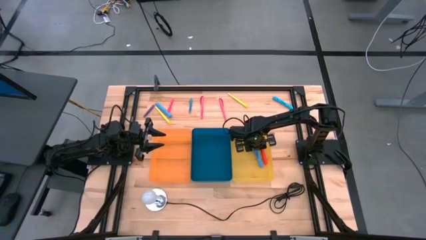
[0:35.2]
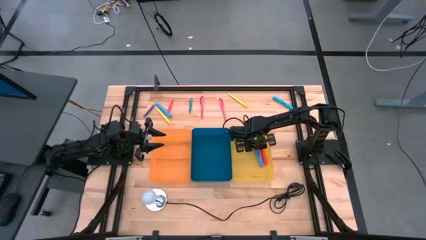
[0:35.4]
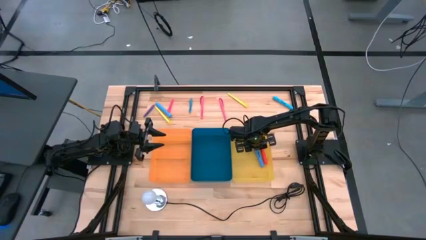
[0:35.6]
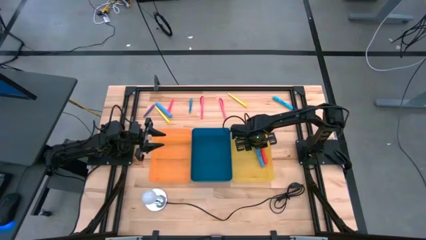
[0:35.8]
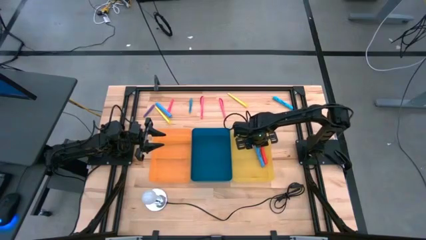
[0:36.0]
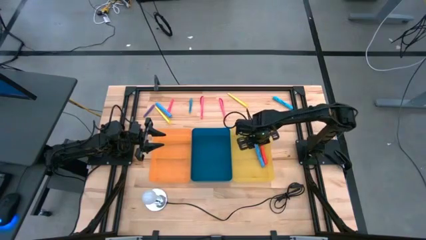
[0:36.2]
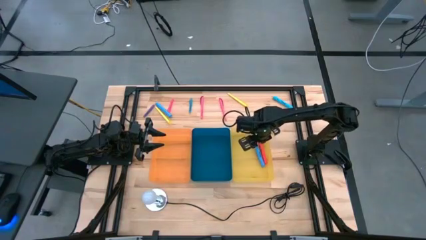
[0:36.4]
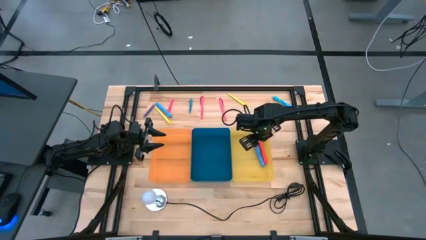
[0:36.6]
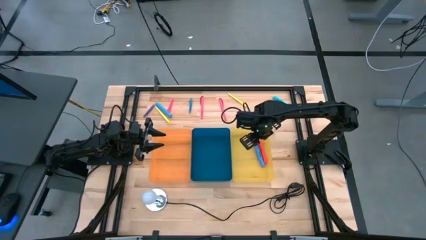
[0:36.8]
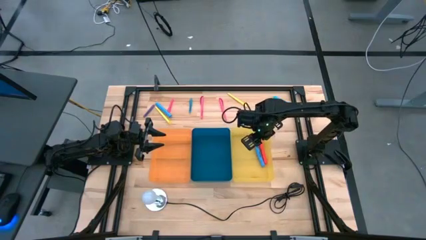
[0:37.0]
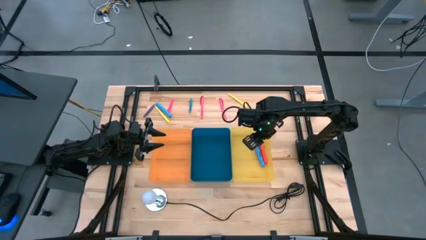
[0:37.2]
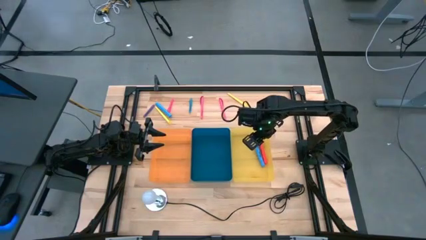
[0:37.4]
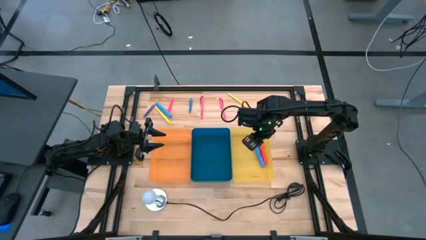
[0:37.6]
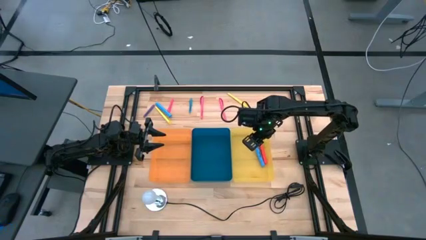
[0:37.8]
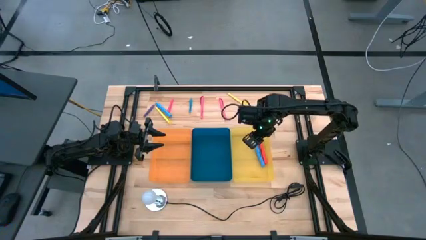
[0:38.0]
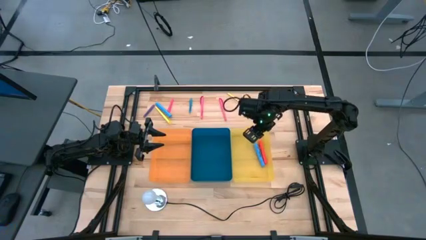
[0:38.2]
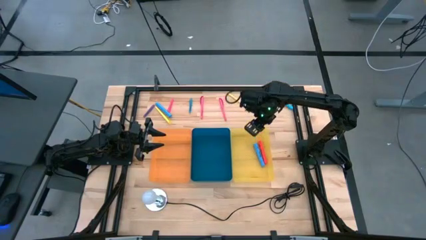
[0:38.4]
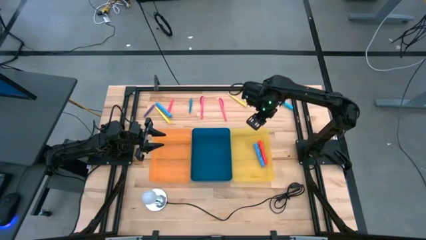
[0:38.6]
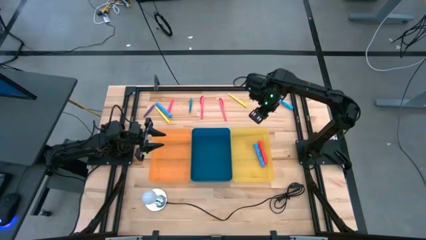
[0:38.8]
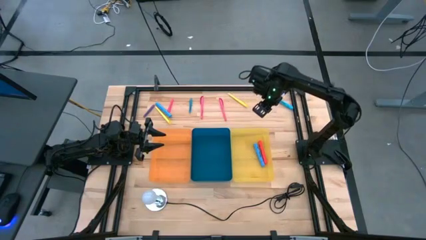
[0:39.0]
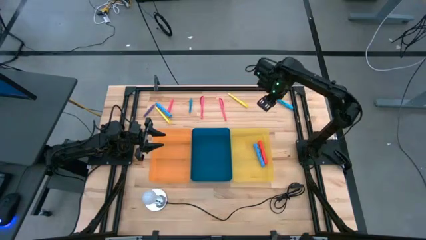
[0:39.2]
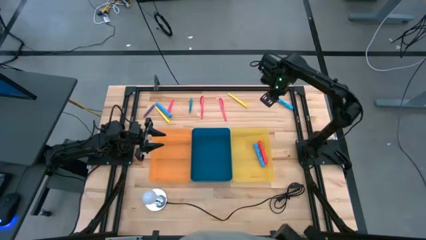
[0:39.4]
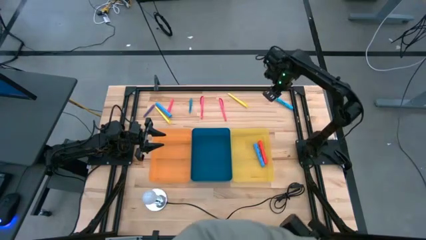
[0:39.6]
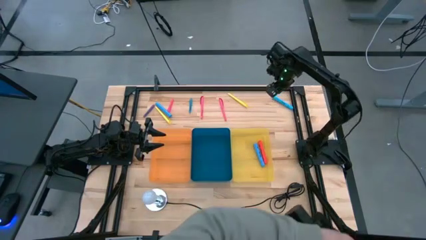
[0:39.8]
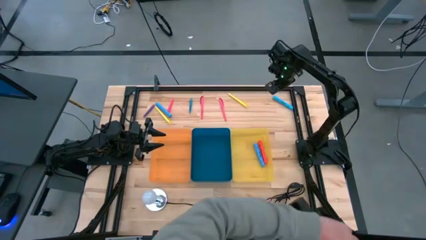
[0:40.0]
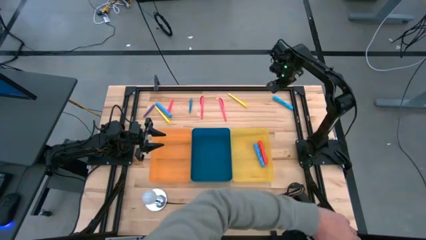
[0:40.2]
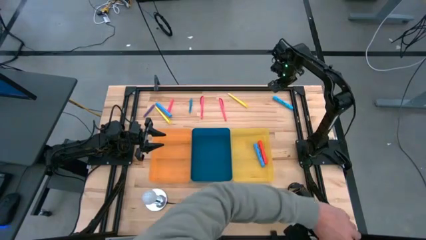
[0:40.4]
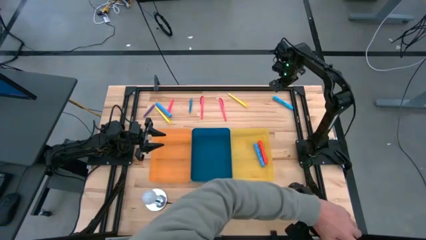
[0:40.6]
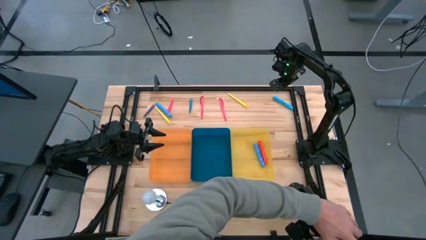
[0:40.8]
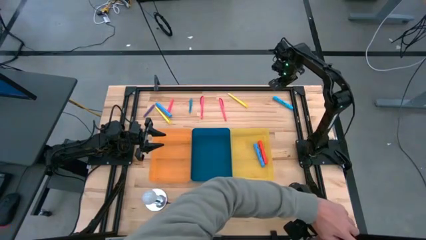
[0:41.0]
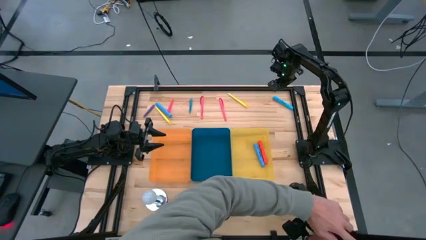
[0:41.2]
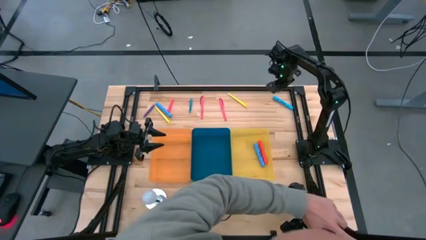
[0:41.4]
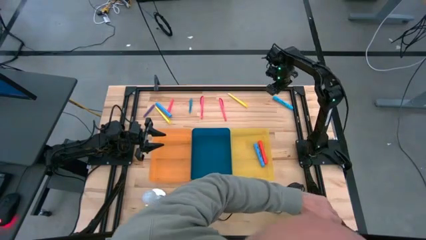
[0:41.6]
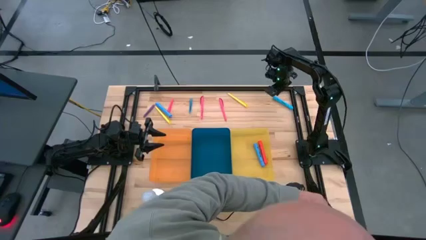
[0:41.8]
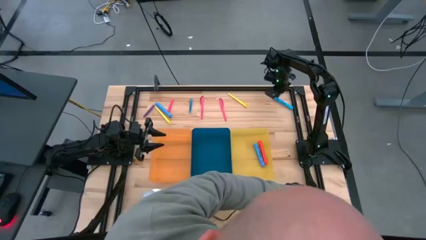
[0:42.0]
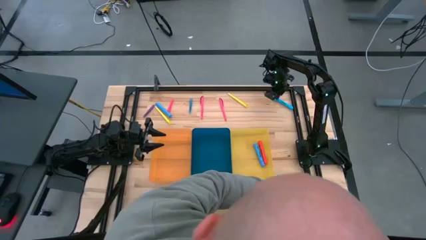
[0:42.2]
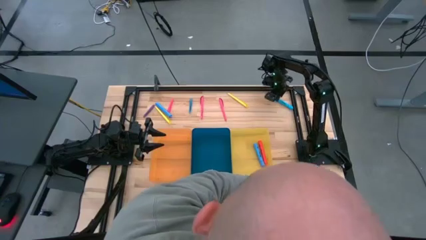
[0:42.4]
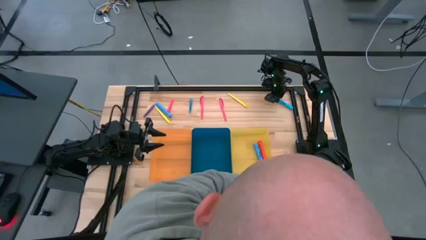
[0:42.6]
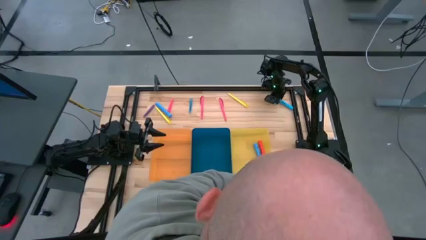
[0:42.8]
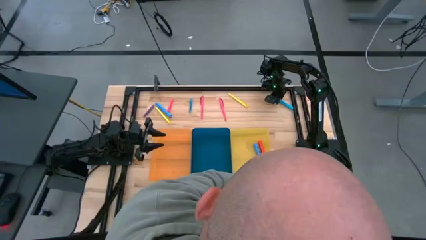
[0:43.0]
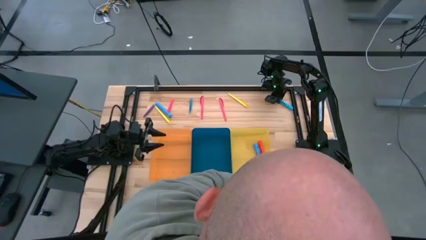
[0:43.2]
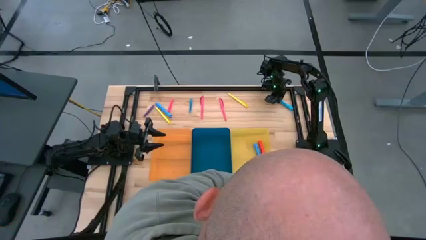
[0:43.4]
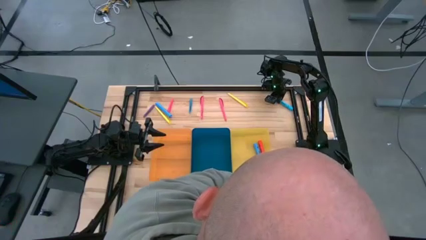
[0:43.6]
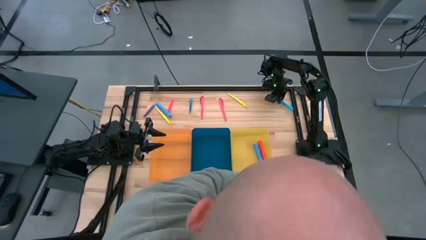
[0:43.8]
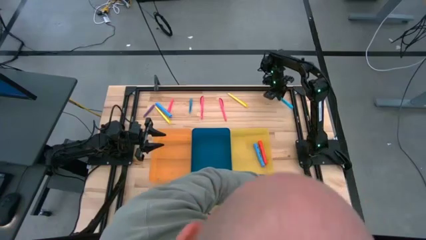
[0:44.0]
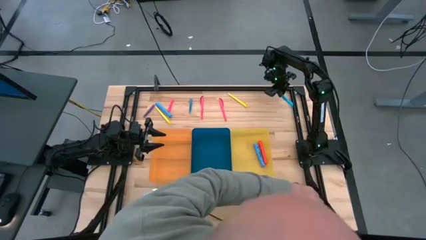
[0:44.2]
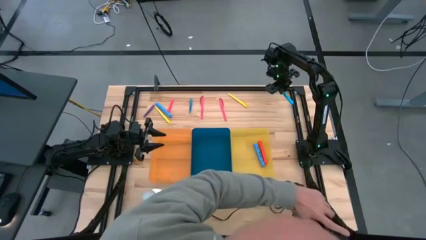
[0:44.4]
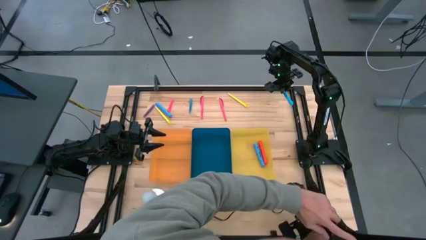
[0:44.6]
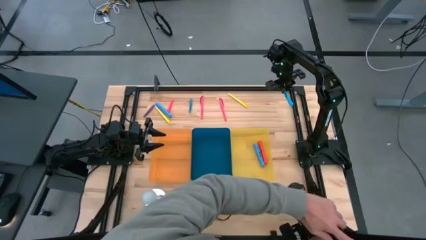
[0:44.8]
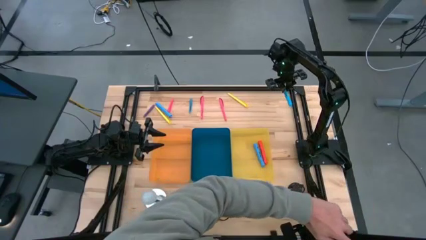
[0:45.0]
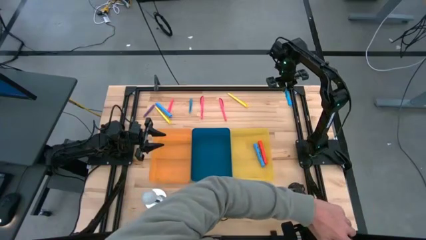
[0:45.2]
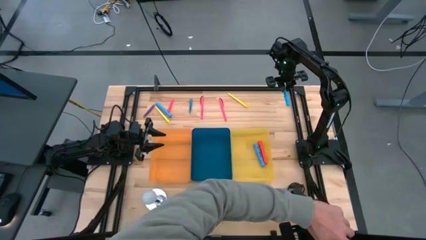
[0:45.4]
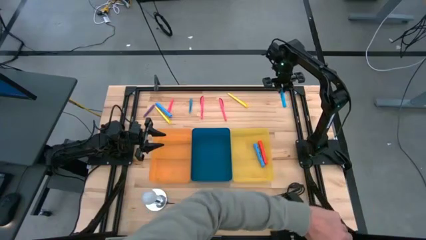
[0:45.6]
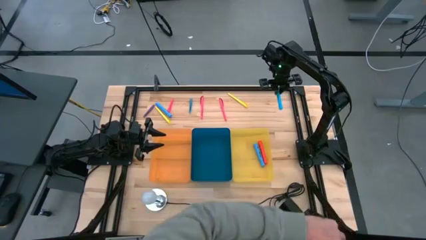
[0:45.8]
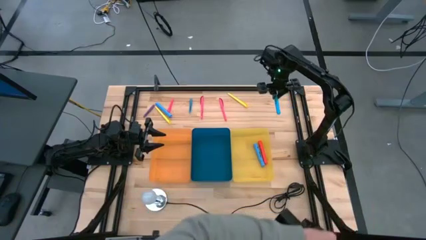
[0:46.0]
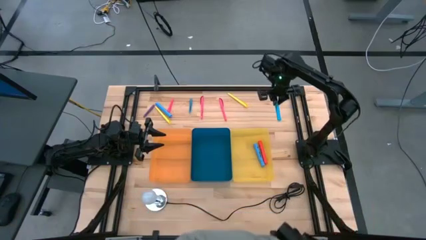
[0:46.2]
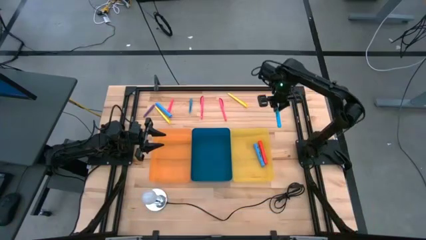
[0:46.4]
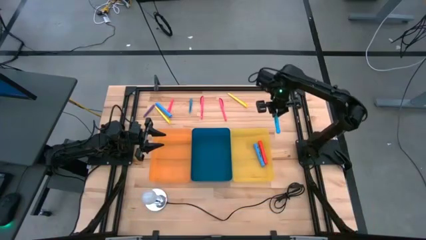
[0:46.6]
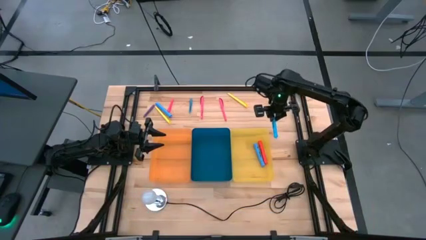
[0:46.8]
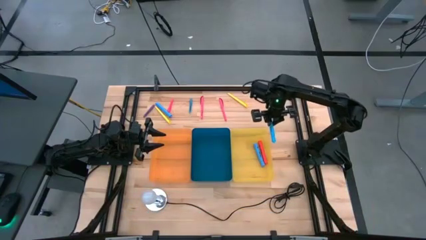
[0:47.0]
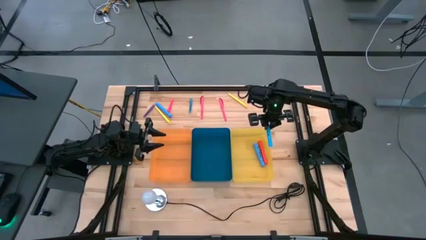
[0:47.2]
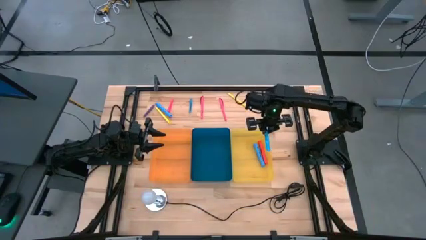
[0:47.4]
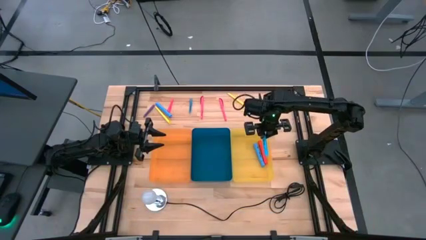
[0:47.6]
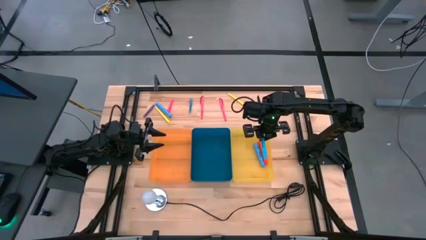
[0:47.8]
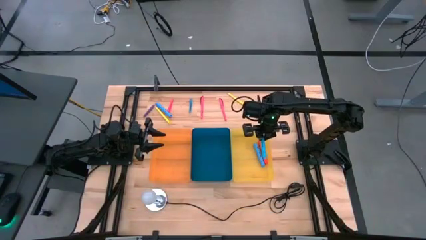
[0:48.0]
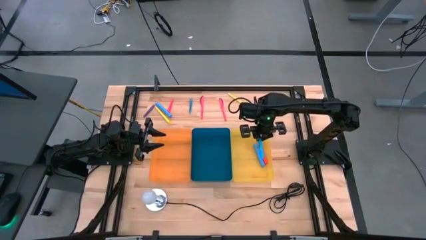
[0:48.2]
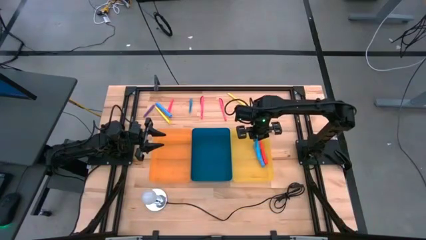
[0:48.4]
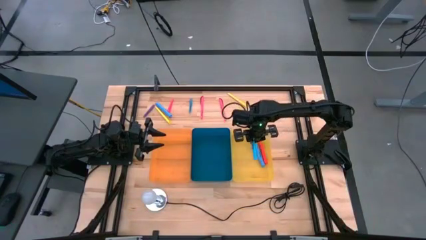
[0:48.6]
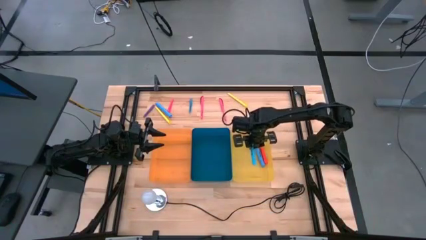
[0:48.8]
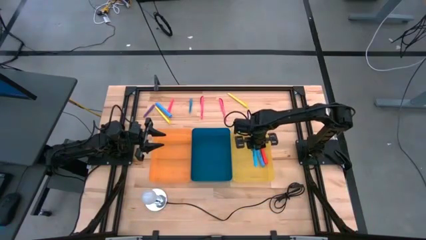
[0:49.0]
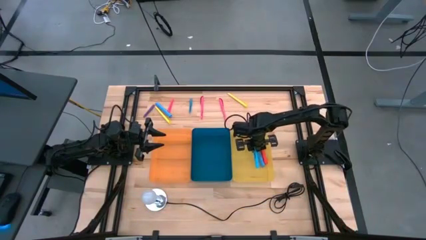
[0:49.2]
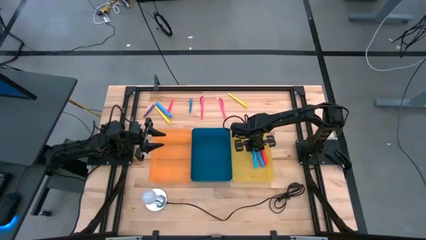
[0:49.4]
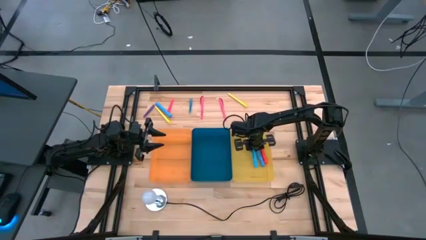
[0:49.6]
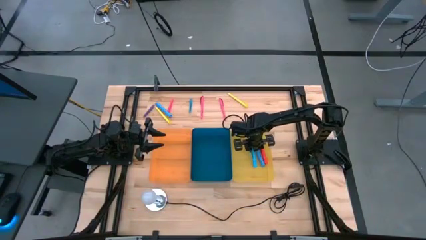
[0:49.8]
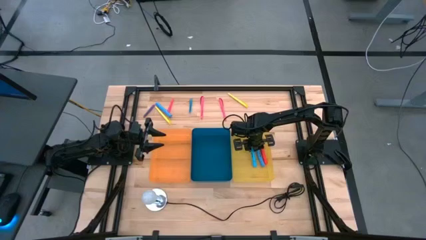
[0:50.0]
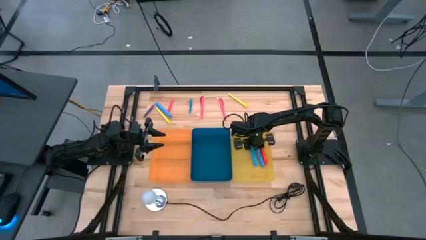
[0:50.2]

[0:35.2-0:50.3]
Task: Pick & Place Markers
Put the right blue marker into the yellow bin
